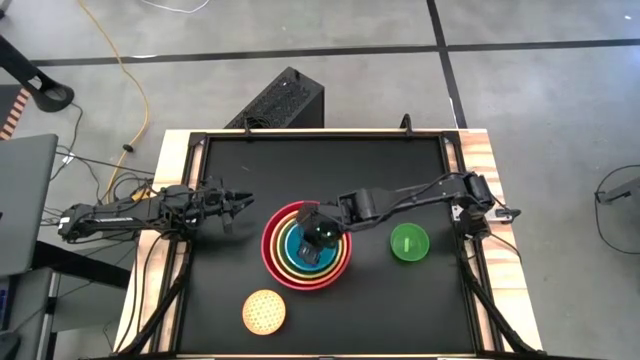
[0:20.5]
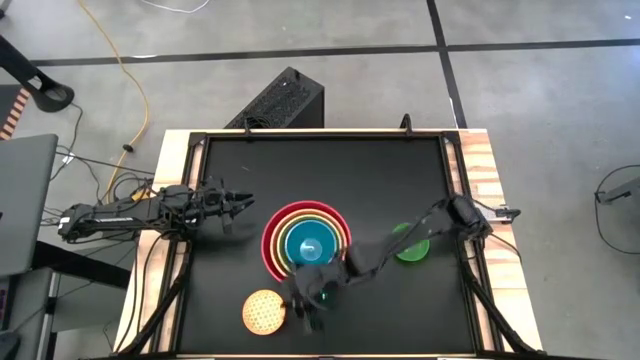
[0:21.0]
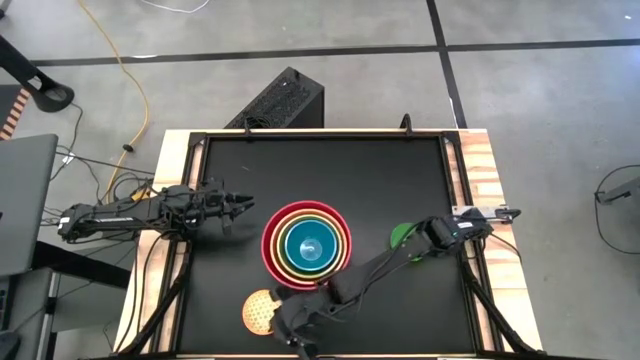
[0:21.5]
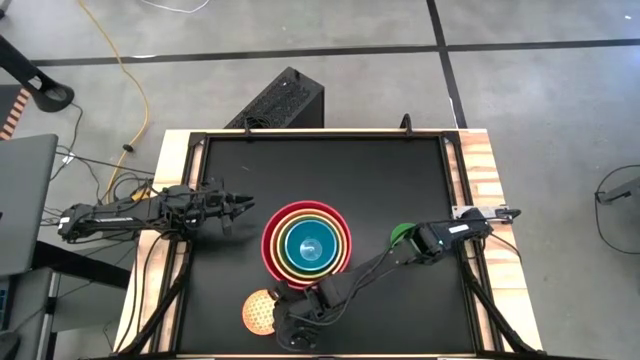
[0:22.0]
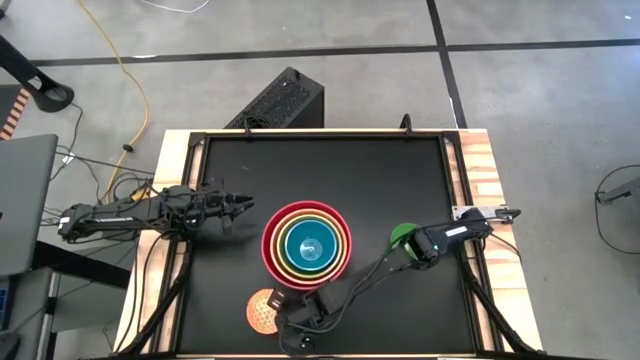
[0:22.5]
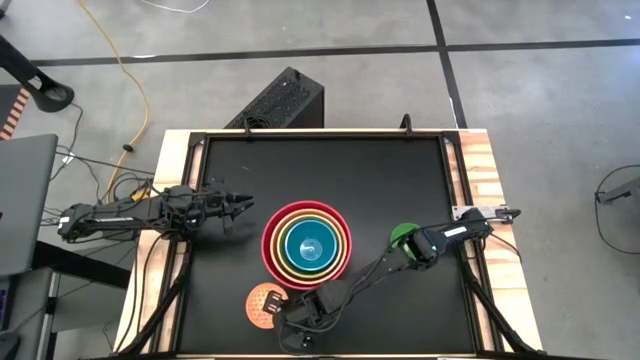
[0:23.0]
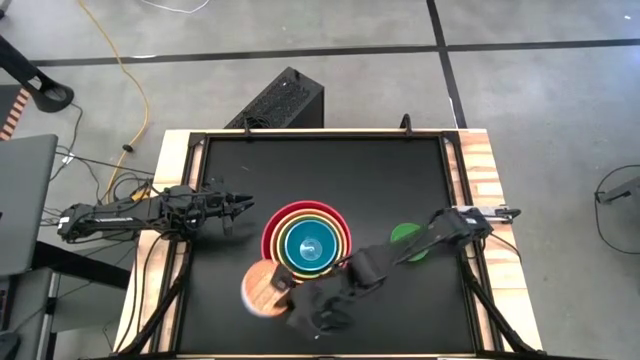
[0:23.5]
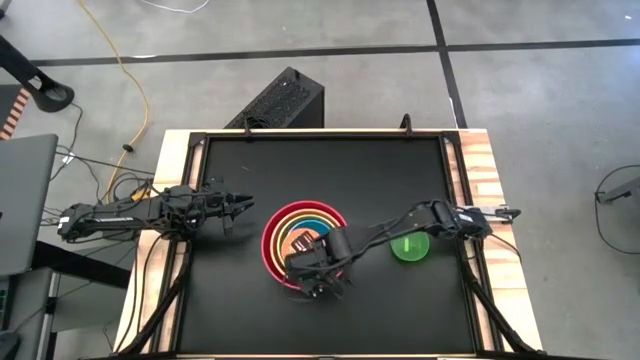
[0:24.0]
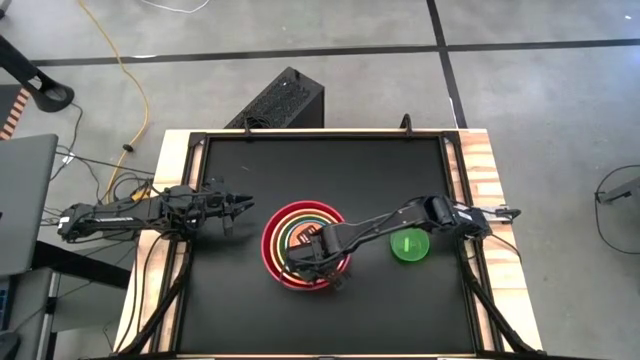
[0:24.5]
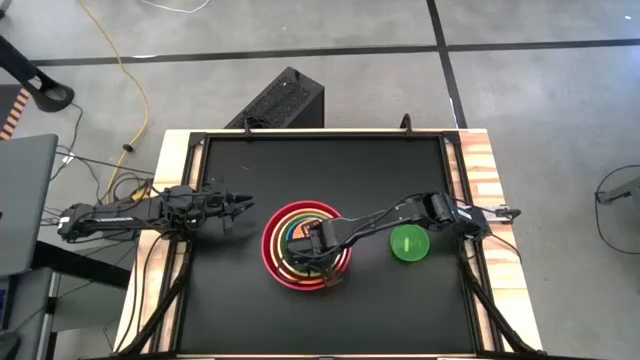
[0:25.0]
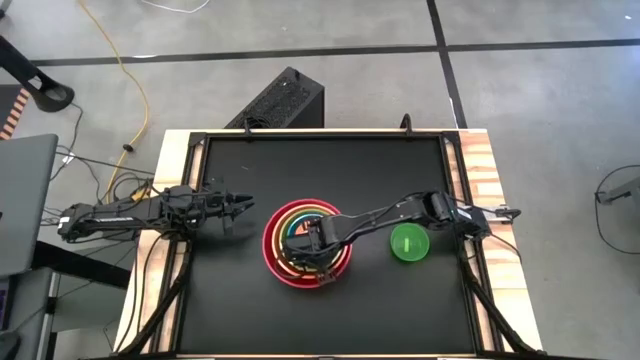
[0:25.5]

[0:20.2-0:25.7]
Stack the orange patterned bowl on top of the blue bowl

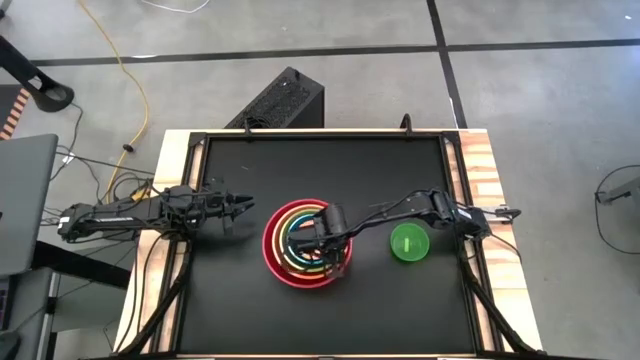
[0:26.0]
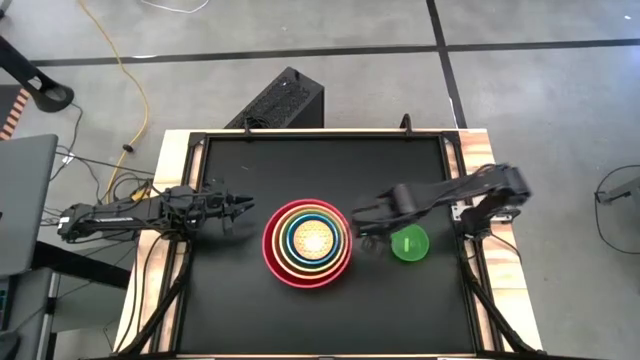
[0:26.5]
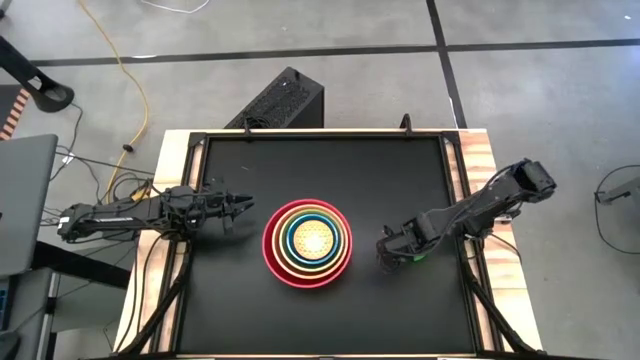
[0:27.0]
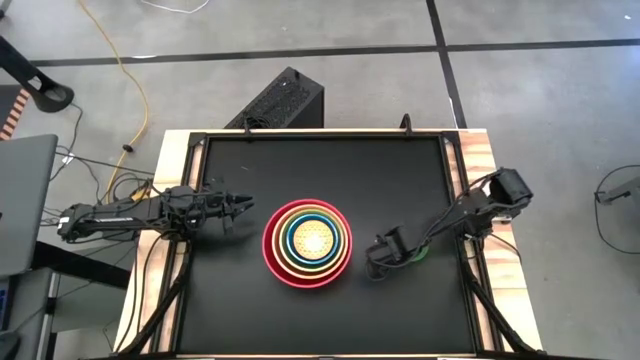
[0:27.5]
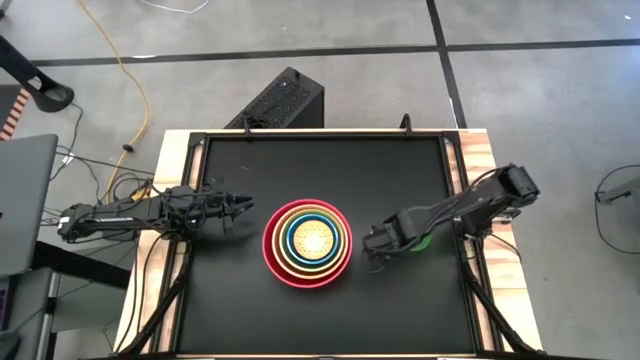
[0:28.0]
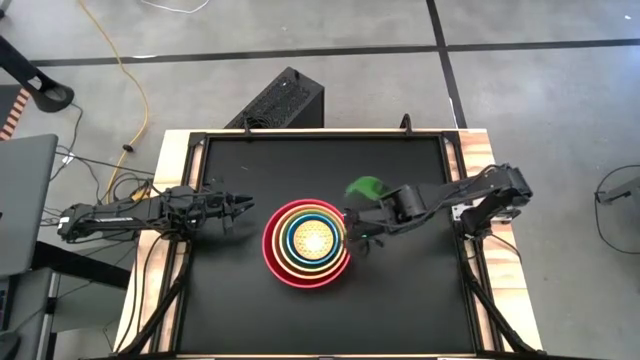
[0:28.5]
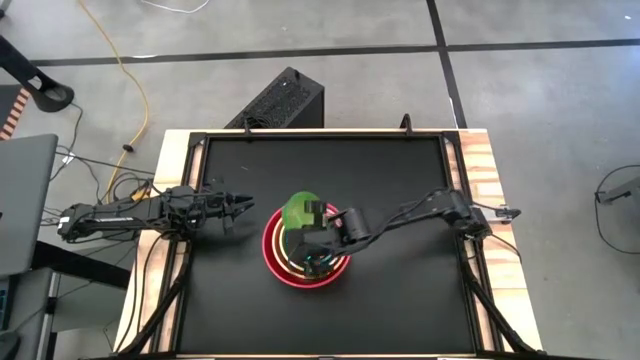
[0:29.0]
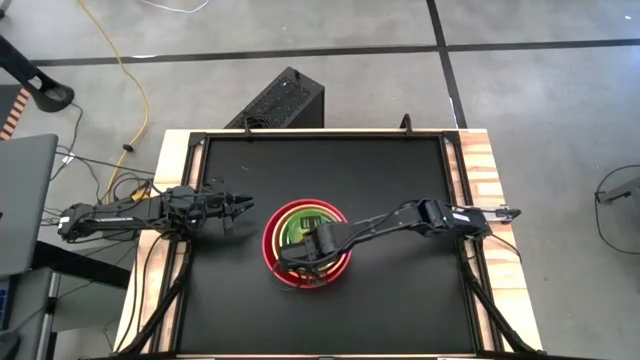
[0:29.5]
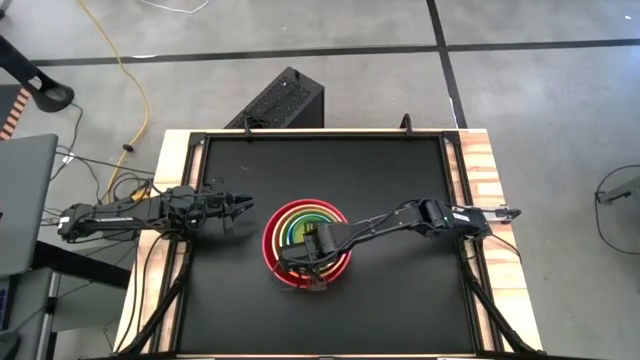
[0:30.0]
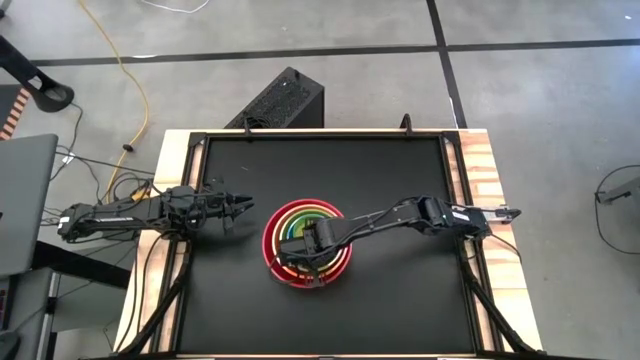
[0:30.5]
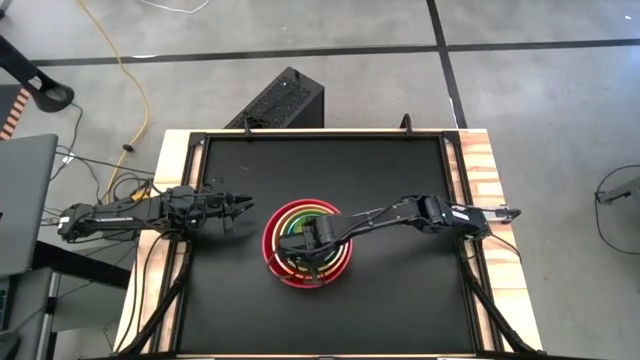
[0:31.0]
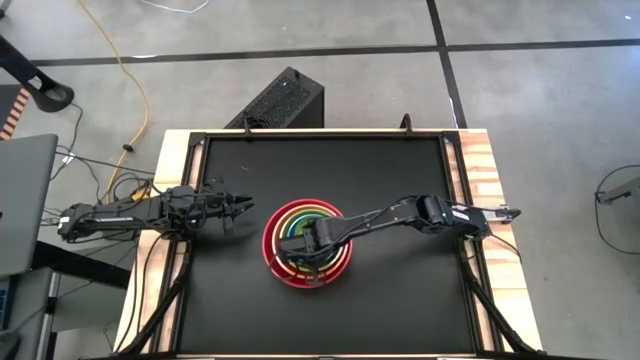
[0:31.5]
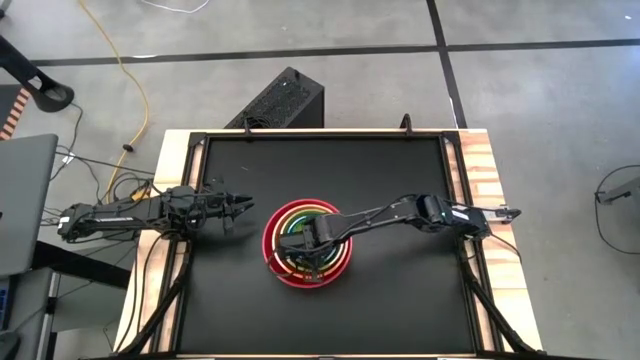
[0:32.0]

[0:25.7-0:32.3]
Stack green bowl on top of the orange patterned bowl

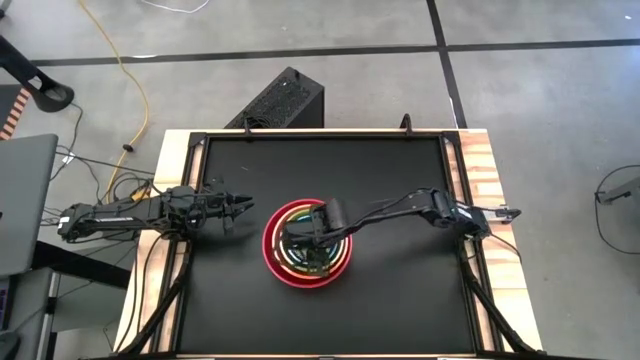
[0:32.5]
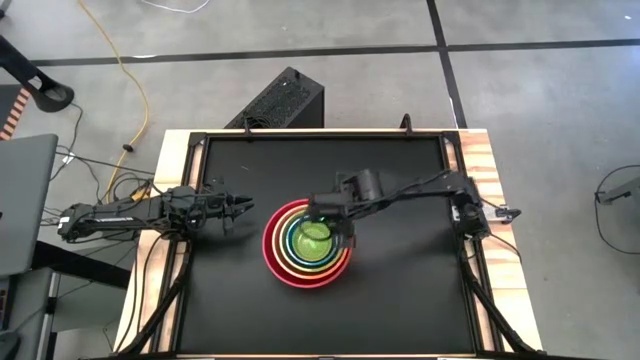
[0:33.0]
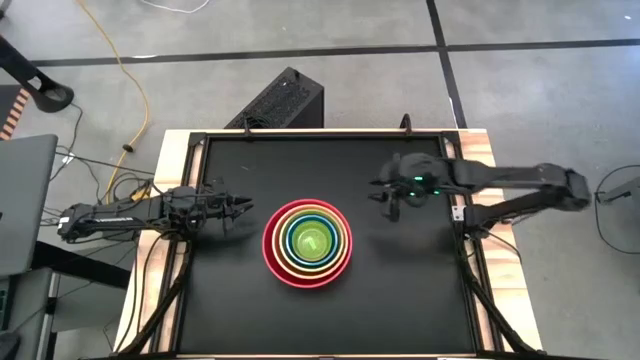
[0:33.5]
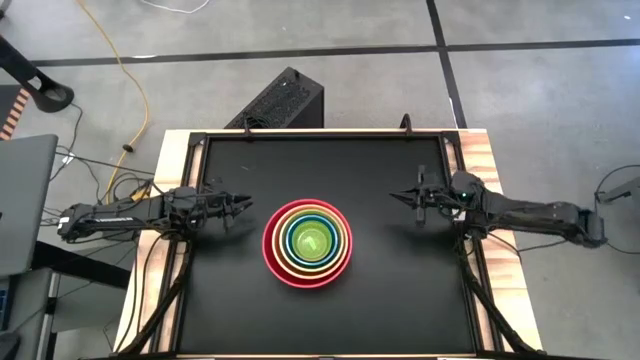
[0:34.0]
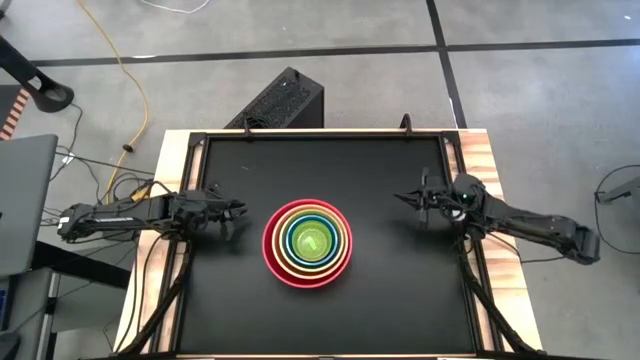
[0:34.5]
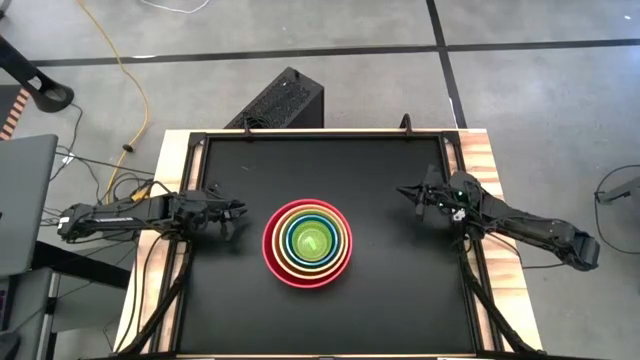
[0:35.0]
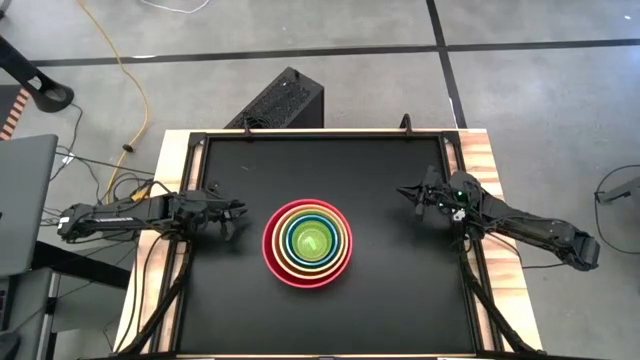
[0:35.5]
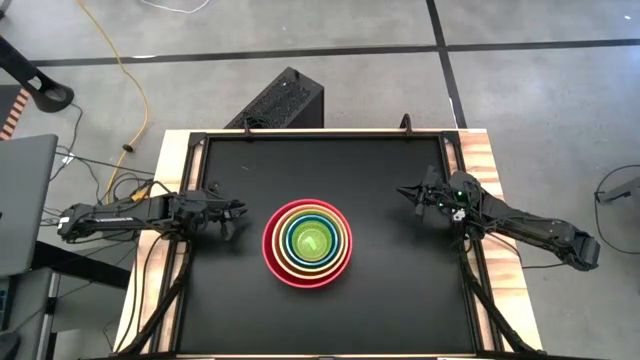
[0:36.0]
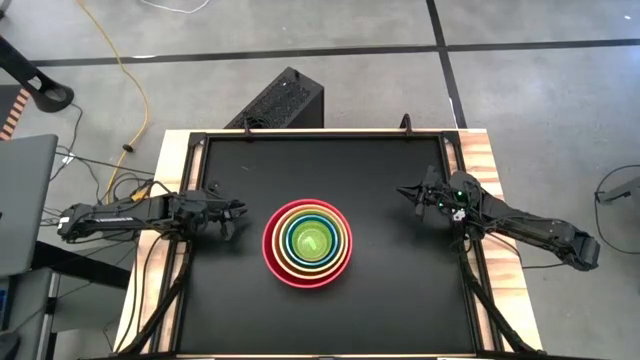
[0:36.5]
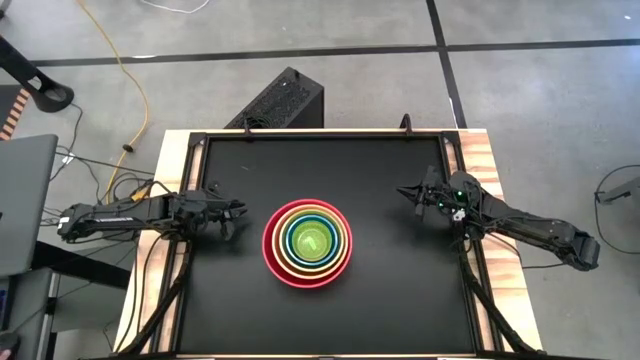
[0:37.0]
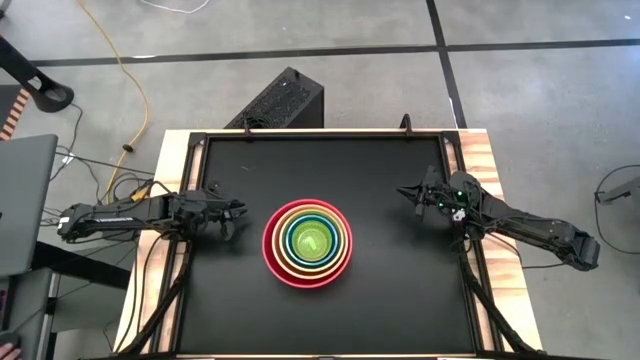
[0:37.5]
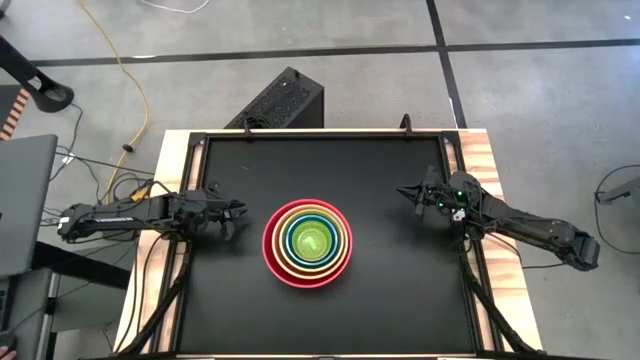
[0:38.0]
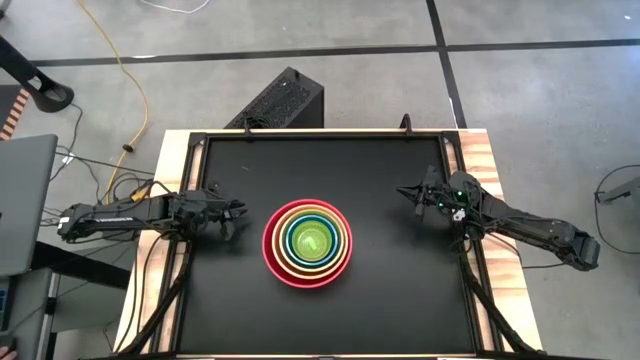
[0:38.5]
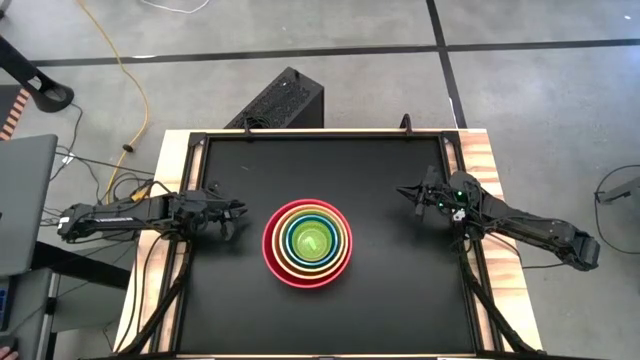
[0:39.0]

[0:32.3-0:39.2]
Return to Home Position
